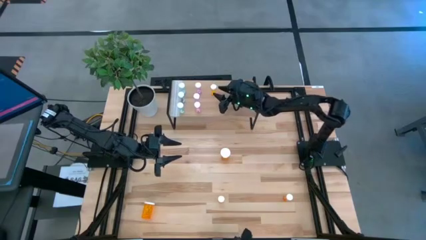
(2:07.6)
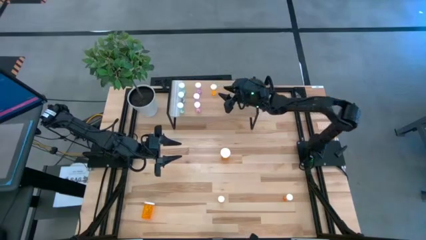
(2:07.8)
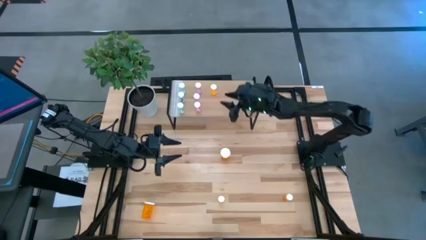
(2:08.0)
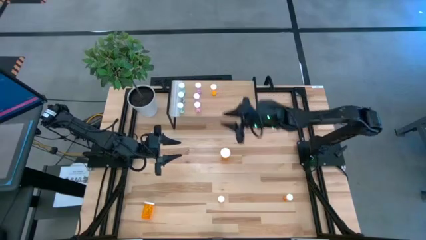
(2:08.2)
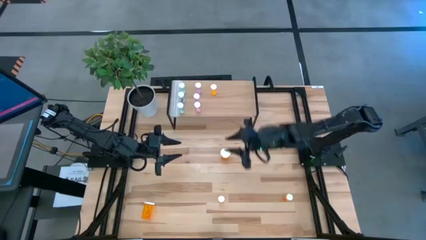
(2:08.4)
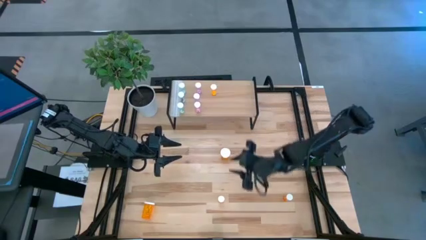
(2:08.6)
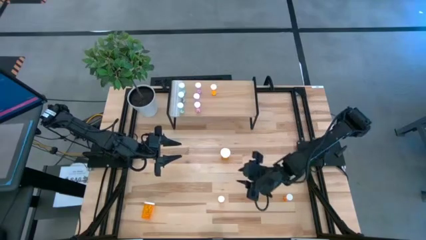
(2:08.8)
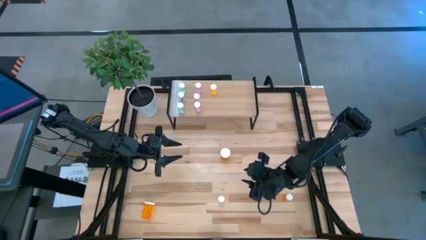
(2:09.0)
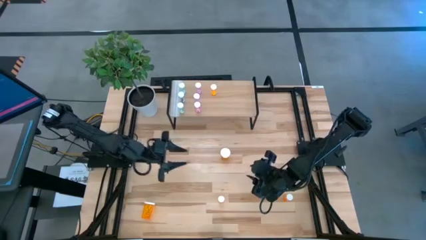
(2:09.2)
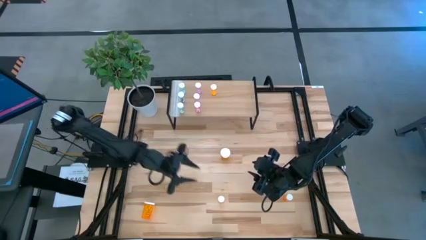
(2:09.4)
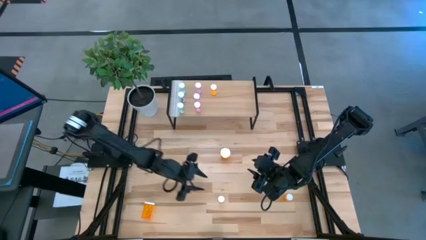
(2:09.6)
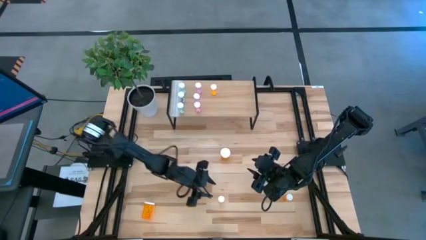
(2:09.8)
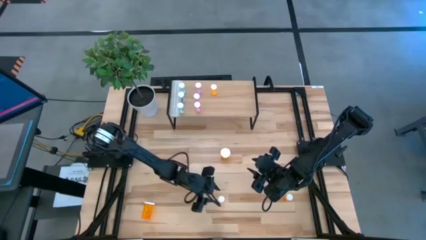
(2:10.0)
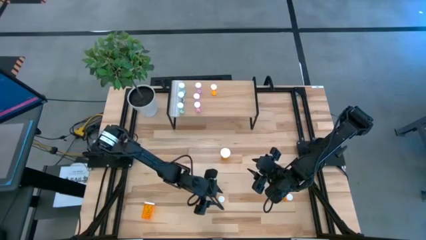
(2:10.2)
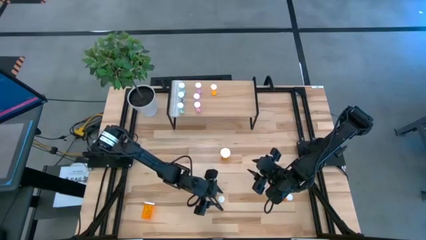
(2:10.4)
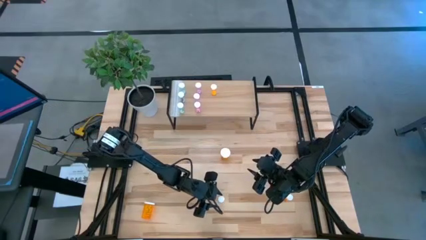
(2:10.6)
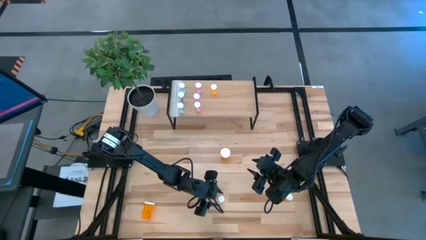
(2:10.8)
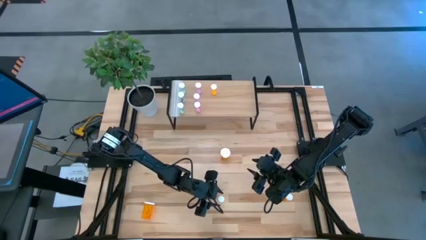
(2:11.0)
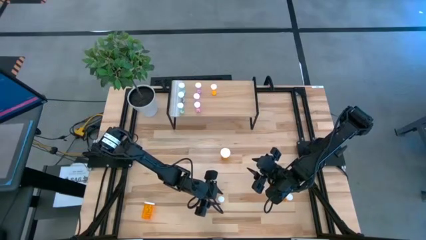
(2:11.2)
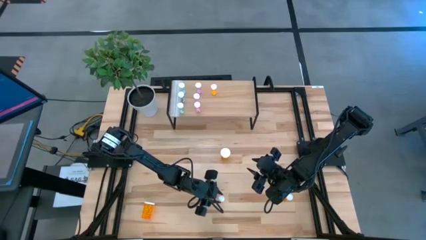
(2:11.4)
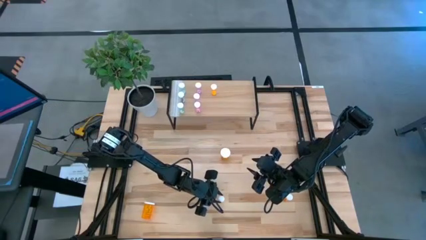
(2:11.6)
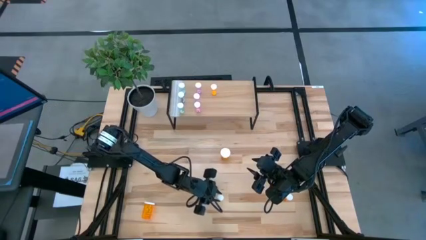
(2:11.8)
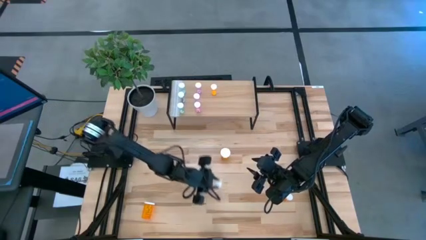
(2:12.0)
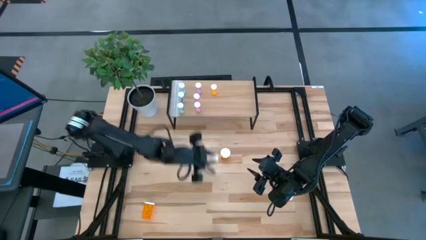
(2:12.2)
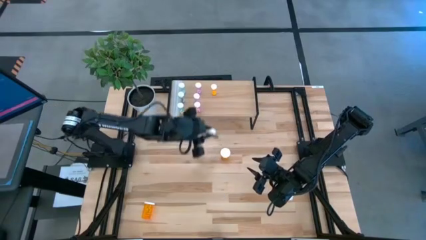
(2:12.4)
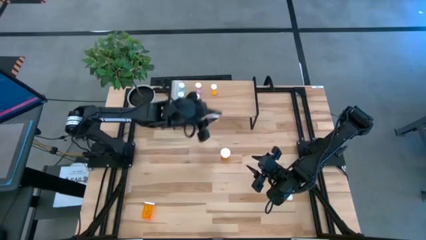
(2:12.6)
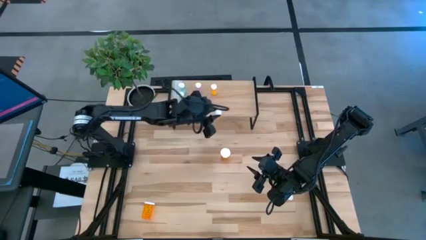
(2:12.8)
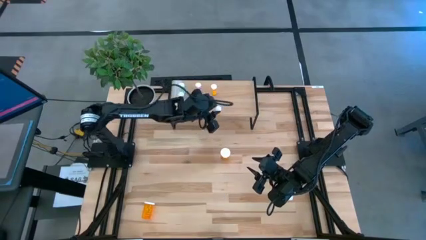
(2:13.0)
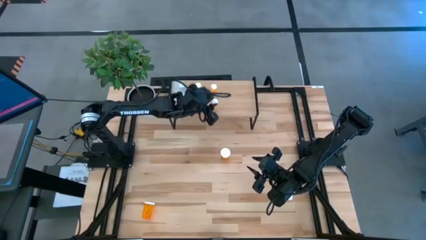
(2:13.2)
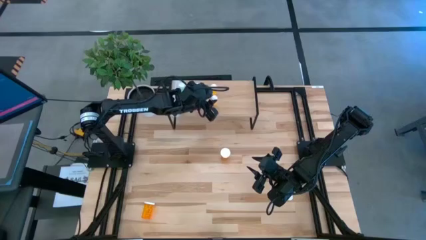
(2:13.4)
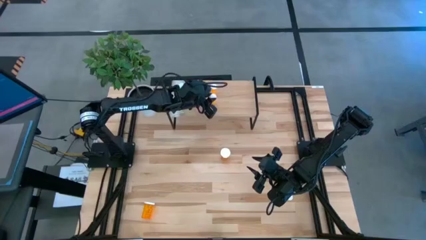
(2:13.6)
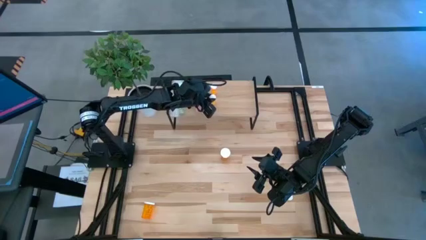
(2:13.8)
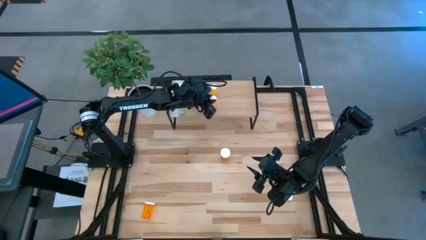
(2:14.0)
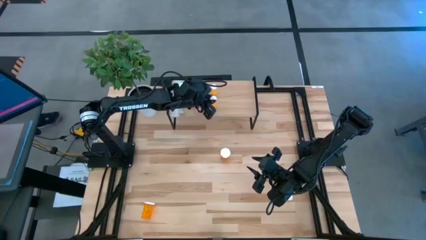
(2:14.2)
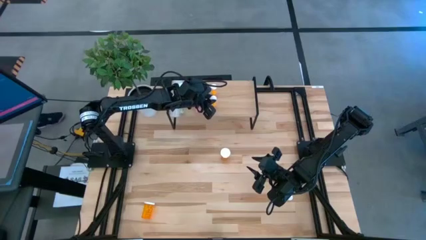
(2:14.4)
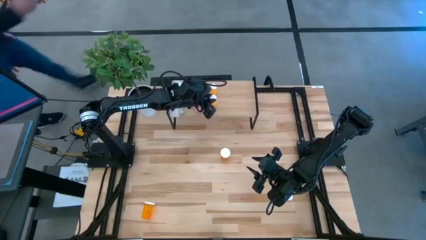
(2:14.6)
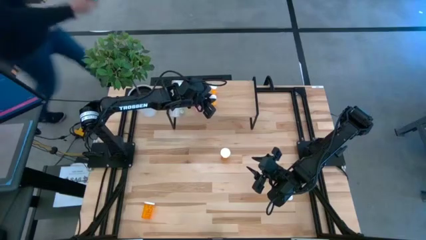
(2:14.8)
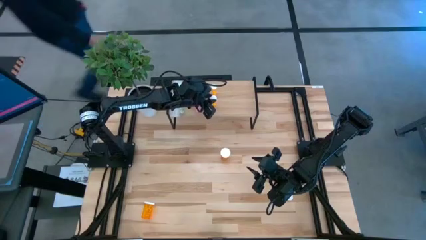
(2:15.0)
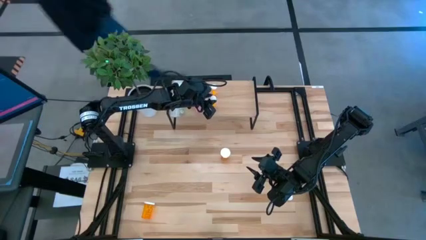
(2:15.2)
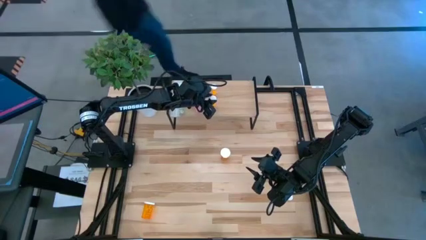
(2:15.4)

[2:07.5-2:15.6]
Task: Pick and place medicine bottles onto shelf by color
Put the left small orange pill bottle on the shelf aligned with the other orange pill bottle

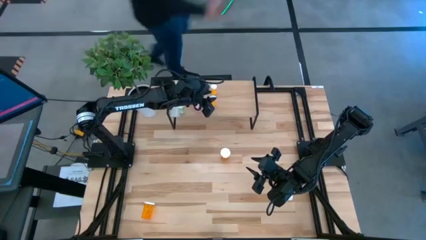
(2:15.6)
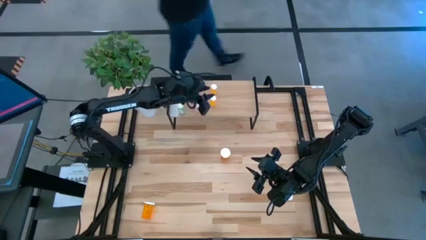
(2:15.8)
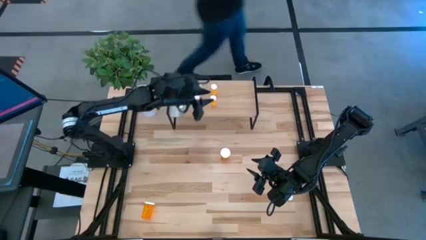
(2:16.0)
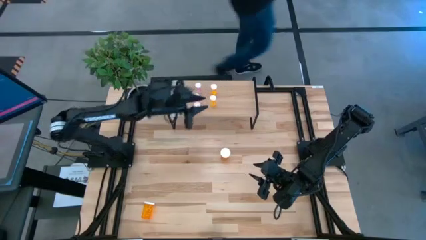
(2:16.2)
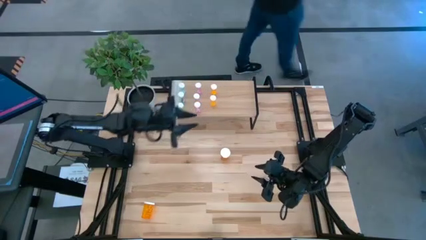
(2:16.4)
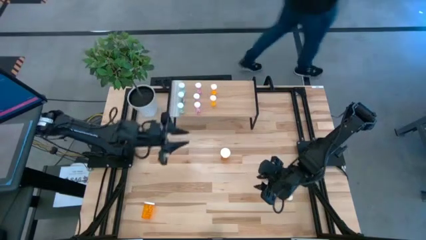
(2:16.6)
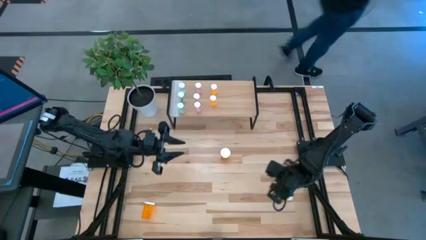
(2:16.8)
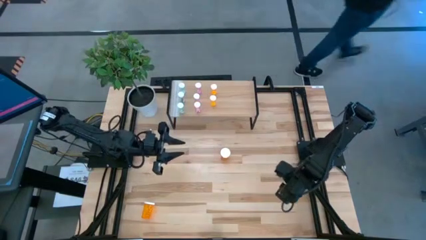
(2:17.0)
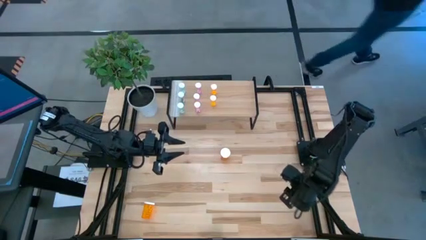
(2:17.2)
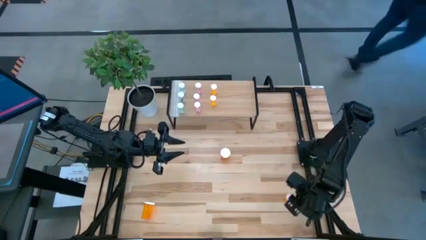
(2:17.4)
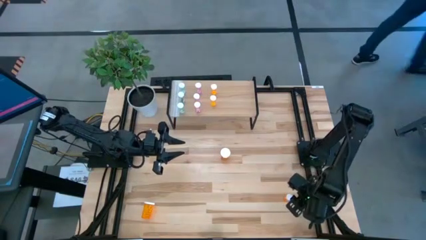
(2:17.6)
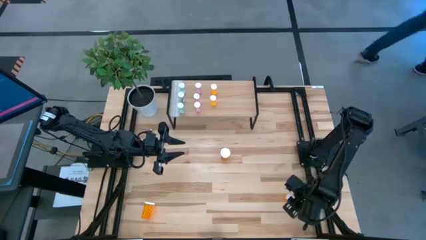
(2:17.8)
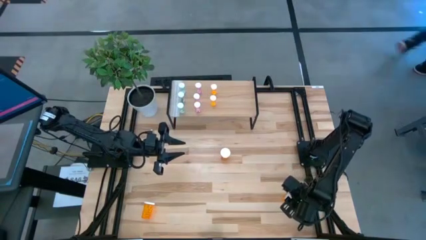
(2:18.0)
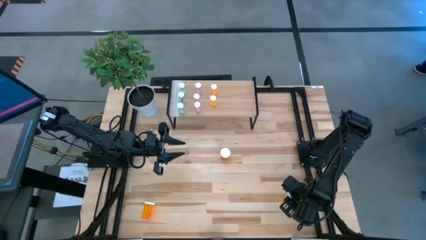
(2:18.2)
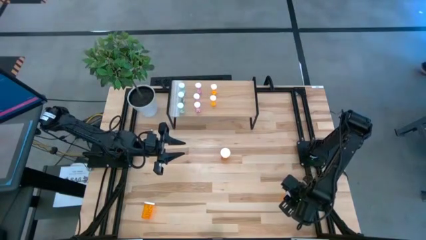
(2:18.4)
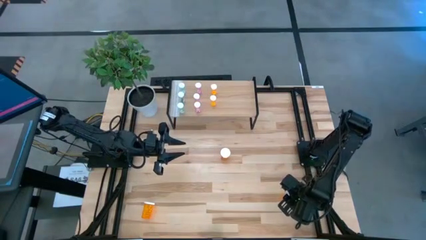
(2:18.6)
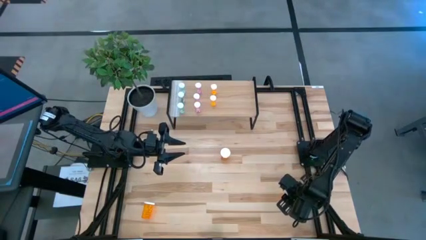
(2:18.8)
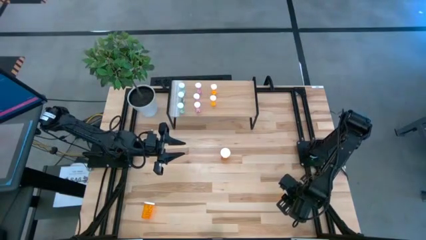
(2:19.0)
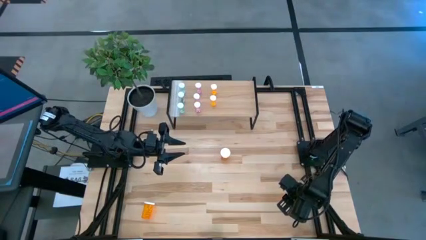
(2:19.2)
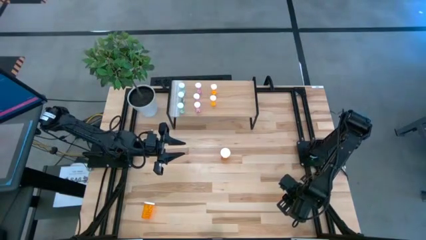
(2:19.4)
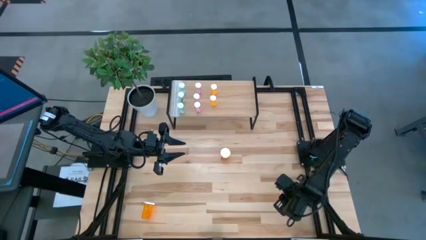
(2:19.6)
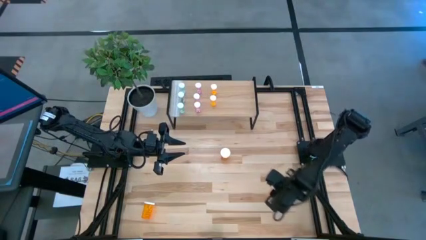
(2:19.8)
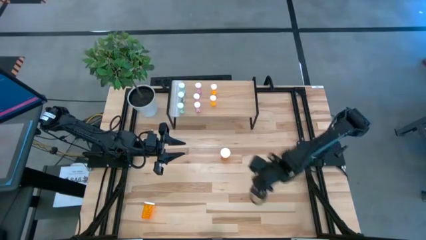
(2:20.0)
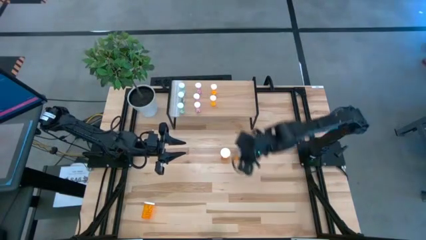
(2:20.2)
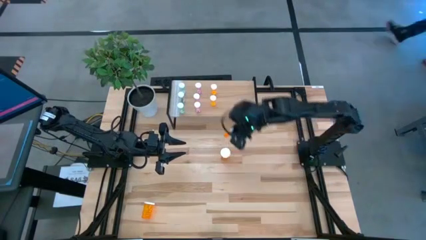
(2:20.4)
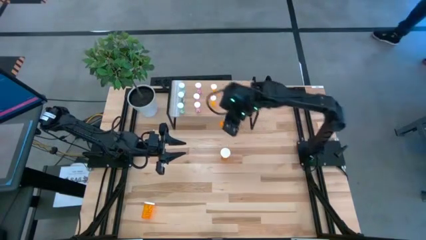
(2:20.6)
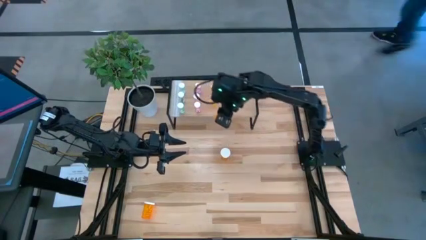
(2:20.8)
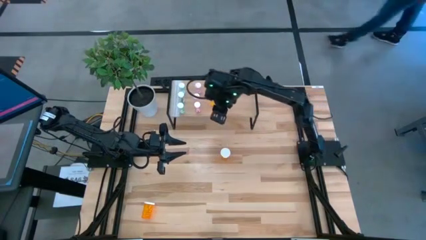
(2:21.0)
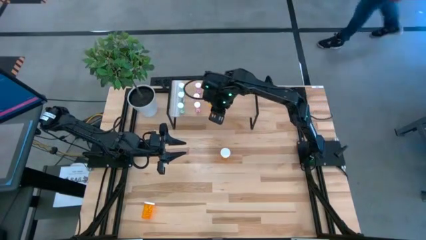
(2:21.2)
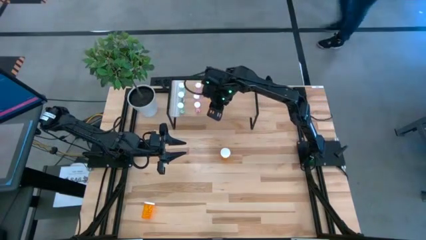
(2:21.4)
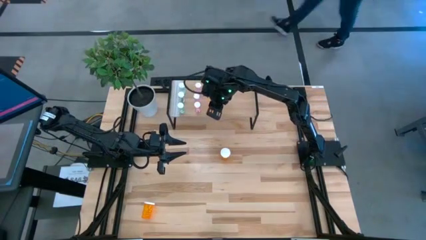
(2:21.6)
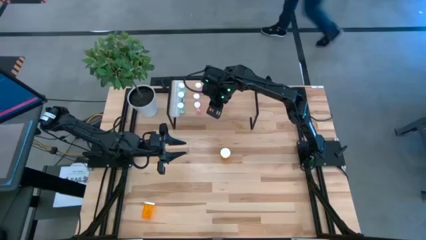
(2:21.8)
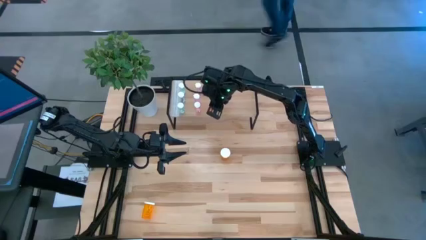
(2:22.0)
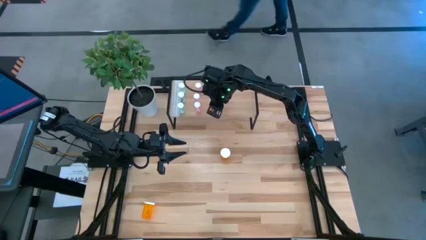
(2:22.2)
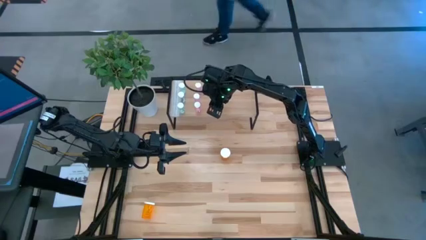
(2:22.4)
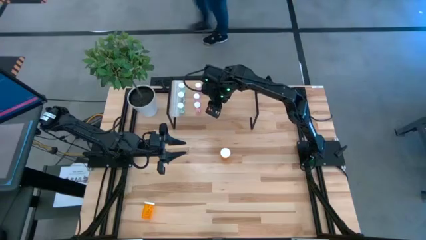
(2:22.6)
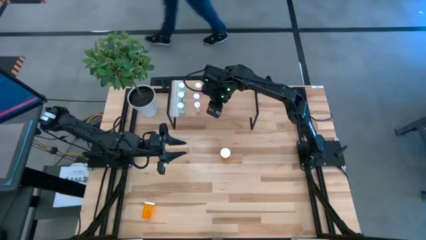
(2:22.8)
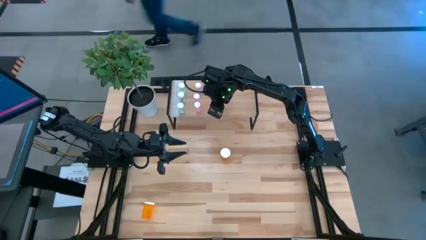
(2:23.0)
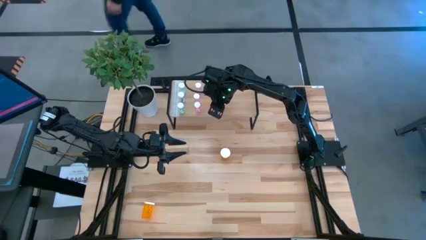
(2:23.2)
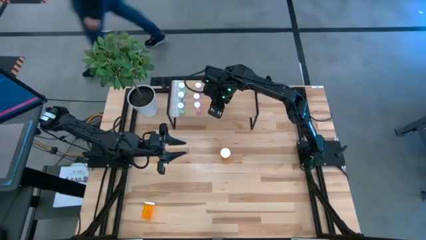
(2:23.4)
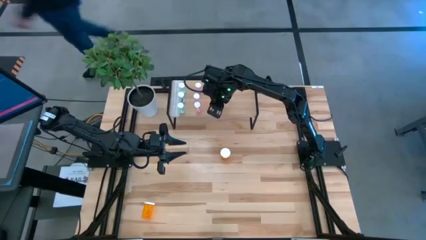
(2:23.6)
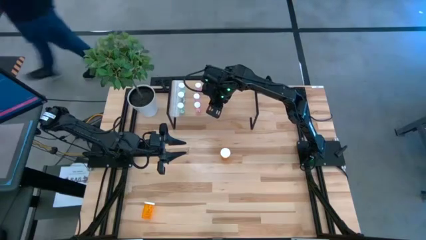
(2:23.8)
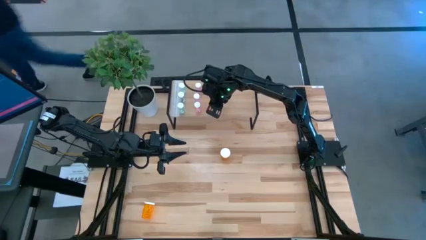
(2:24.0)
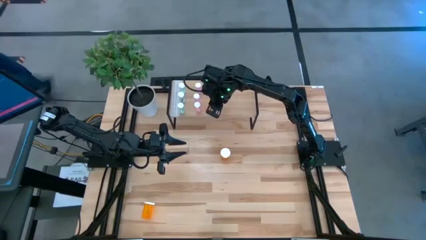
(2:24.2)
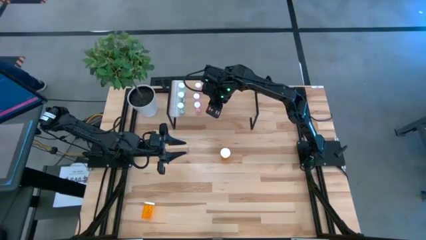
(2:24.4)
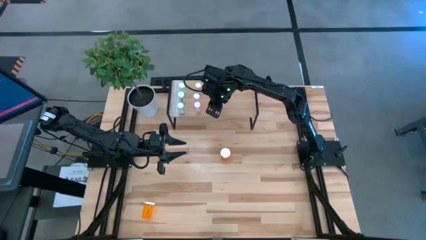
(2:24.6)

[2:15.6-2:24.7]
Put the small orange pill bottle on the shelf aligned with the other orange pill bottles
